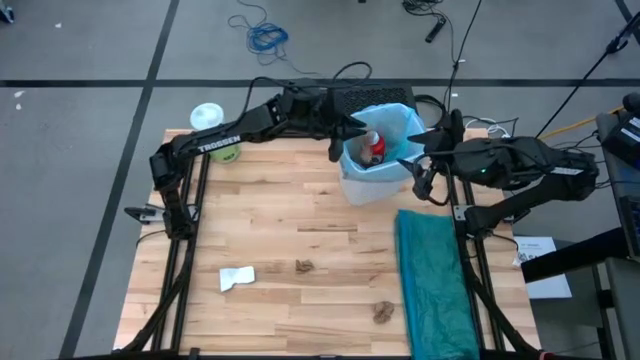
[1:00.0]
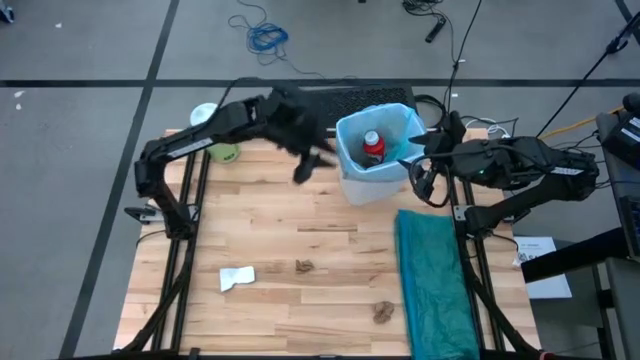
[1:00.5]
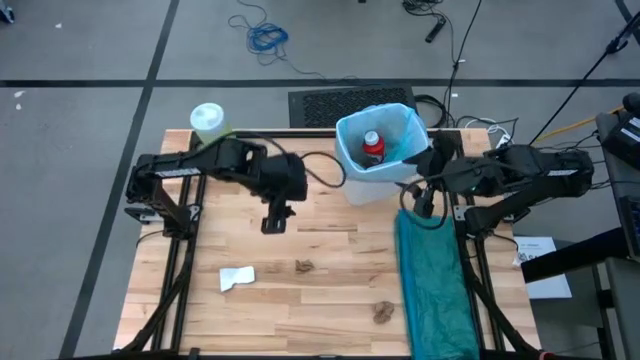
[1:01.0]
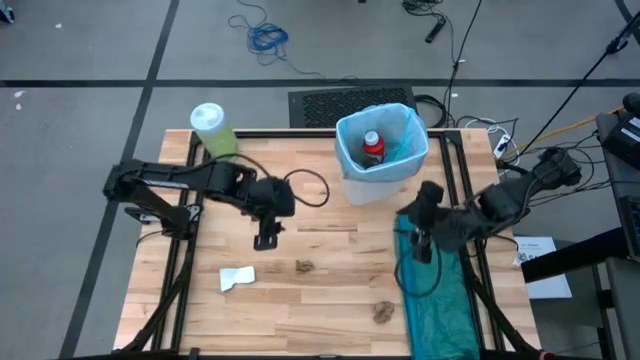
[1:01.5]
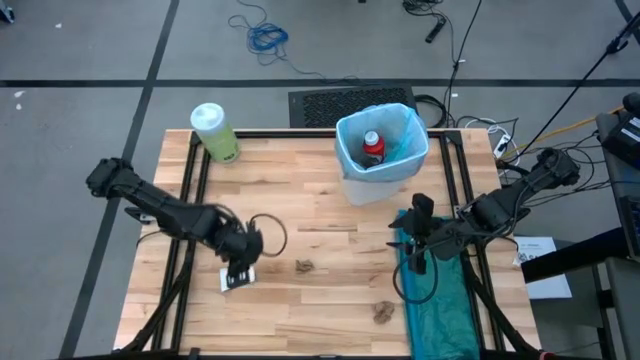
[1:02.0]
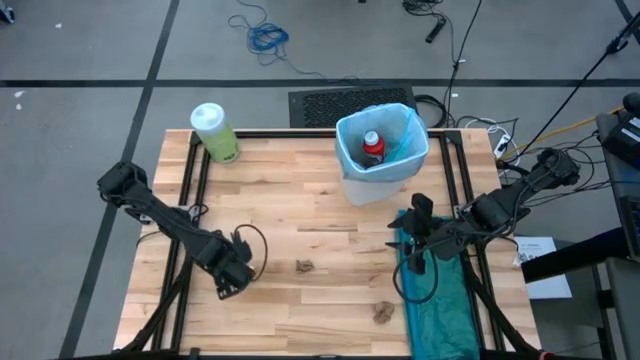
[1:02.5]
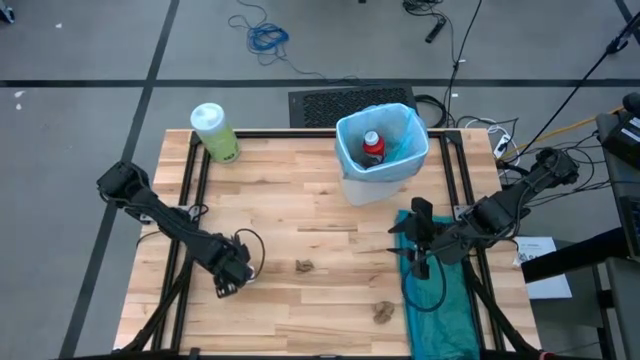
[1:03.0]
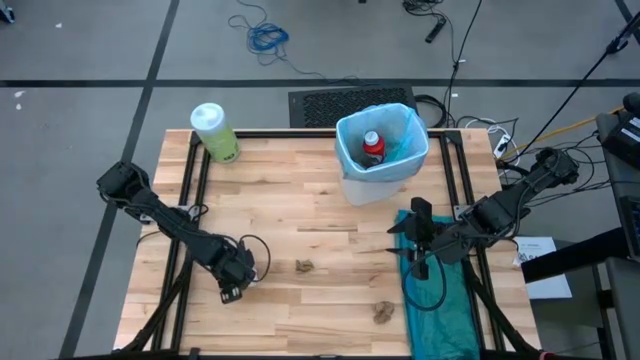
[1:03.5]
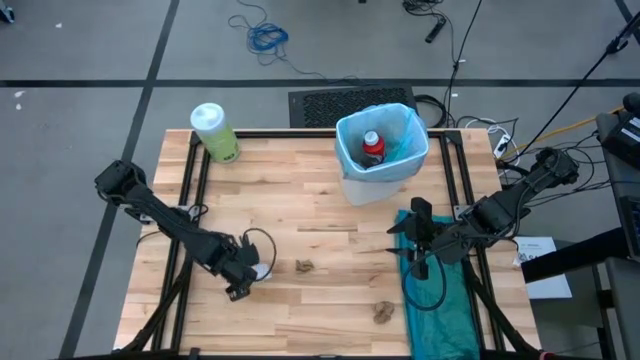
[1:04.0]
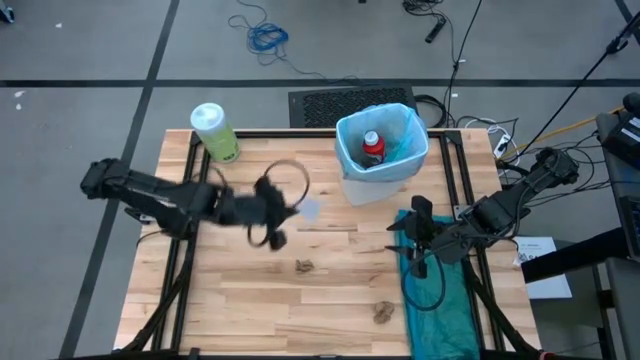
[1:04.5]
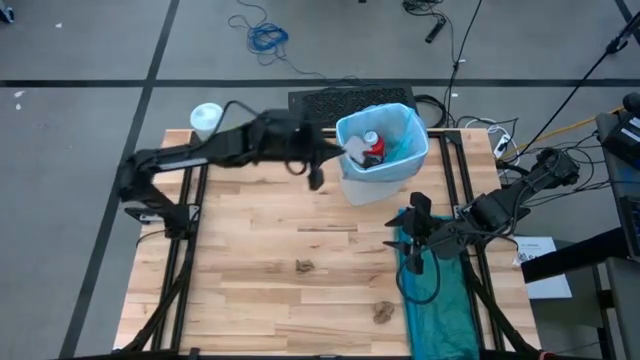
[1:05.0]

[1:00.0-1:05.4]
Task: place trash/remove bag and relplace
Put the white paper trash into the trash bin

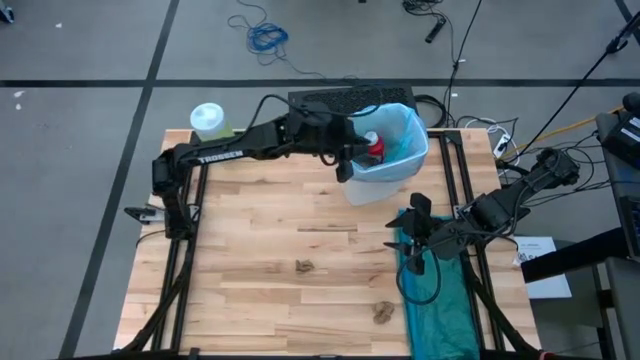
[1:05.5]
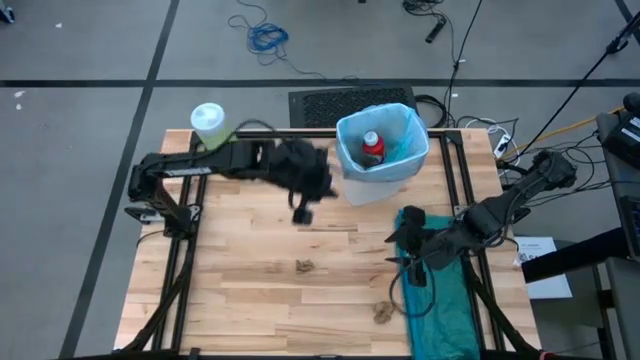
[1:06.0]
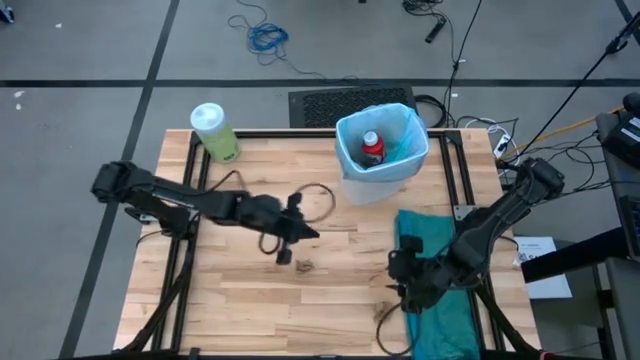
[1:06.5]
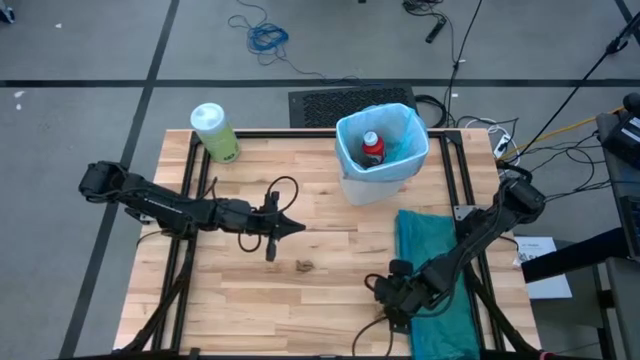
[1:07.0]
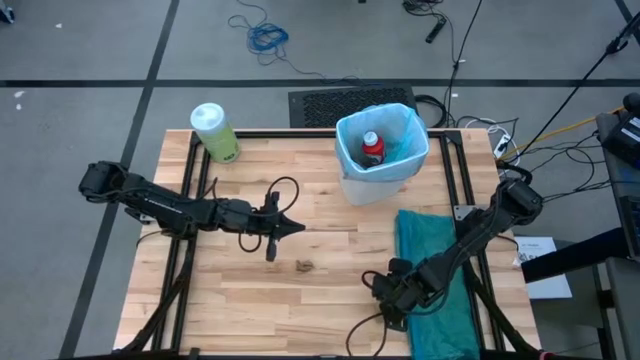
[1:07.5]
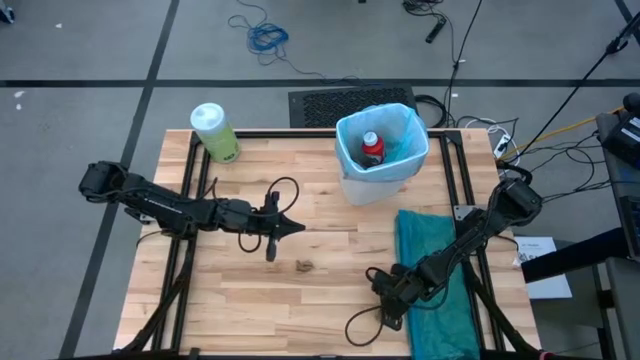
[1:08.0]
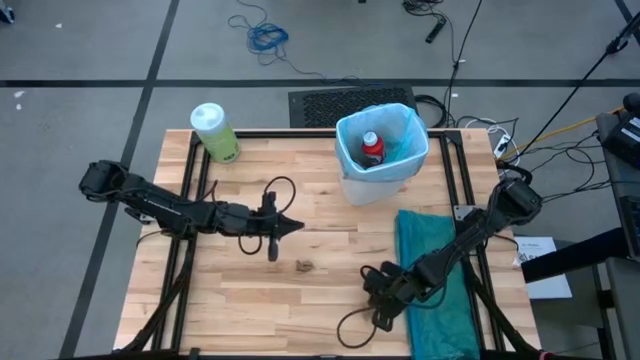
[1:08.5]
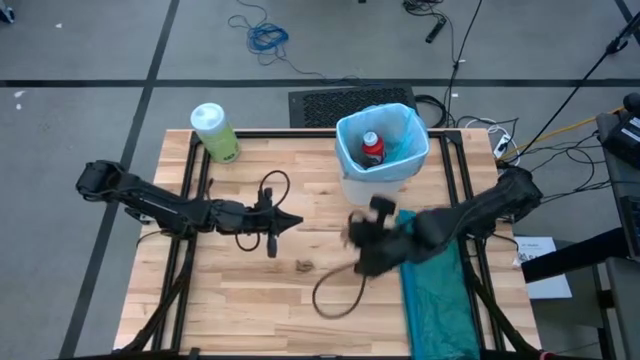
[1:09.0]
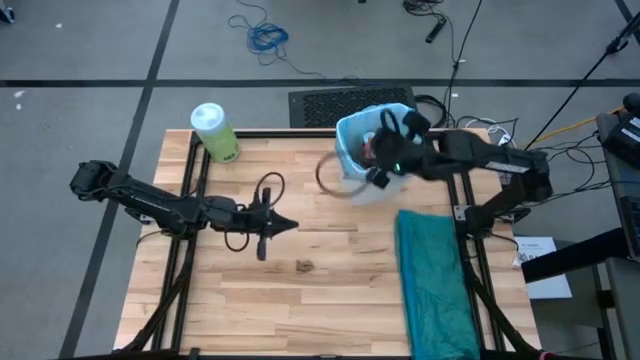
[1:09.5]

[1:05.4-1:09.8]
Put the brown paper trash into the trash bin

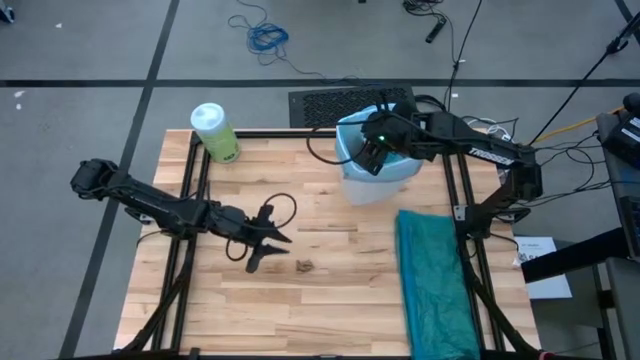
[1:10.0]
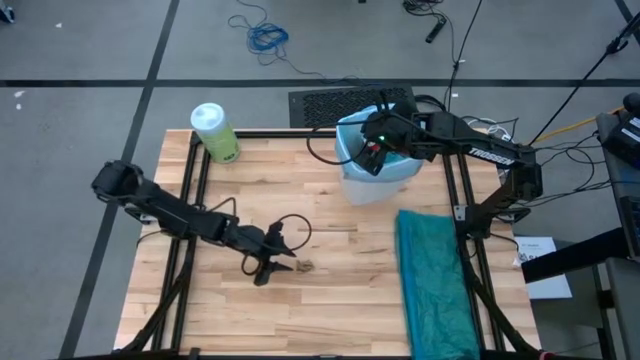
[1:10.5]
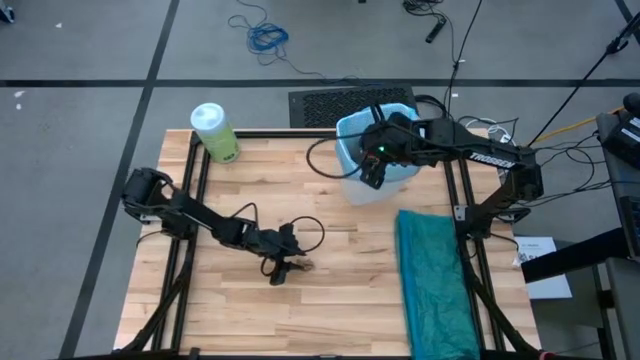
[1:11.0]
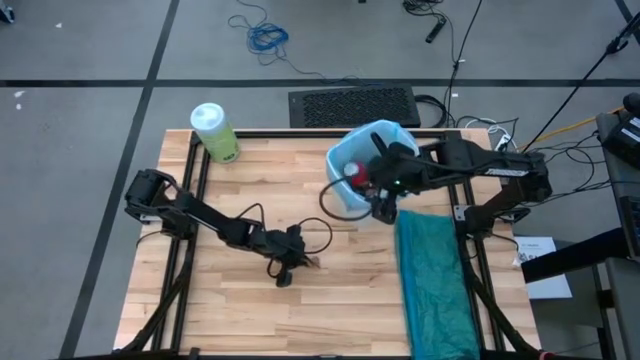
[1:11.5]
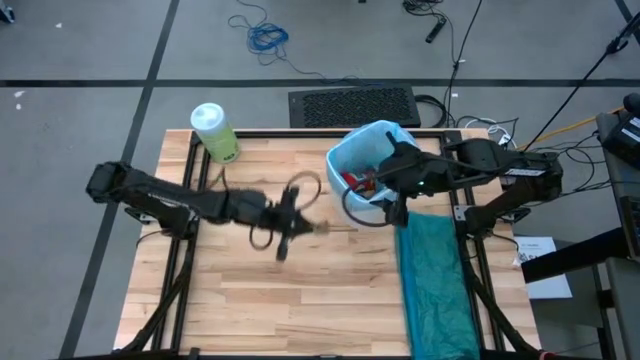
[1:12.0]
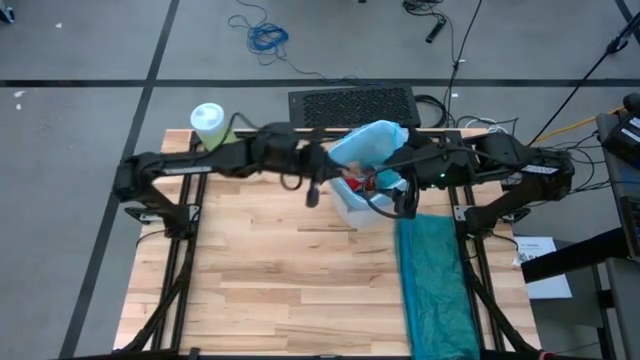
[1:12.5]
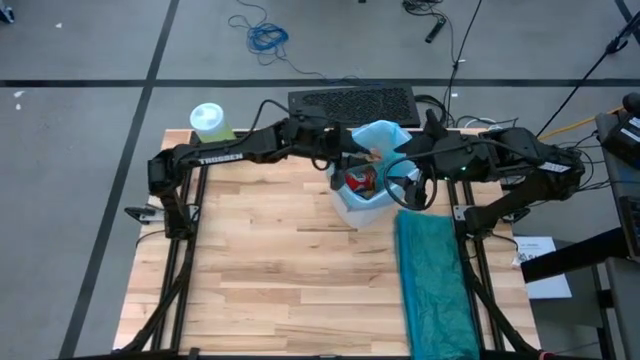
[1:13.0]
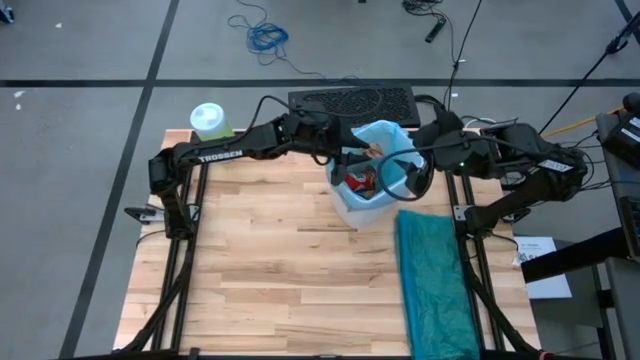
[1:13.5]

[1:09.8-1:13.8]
Put the brown paper trash into the trash bin

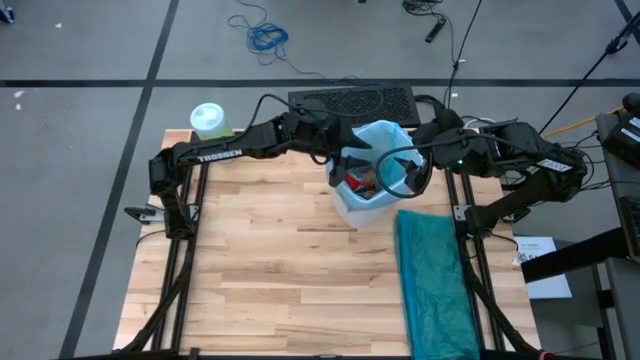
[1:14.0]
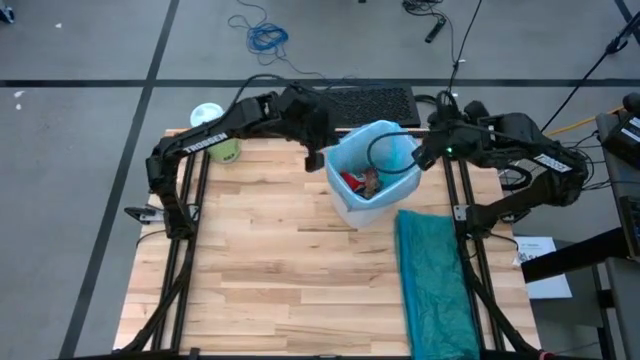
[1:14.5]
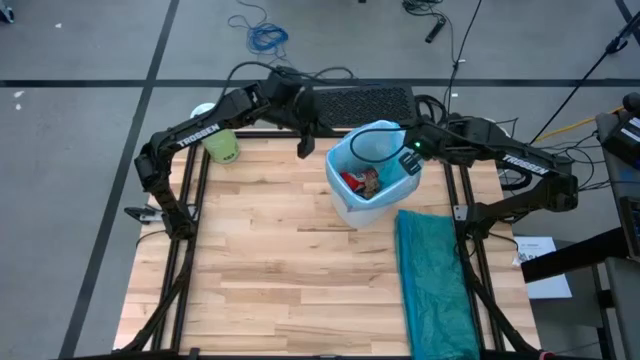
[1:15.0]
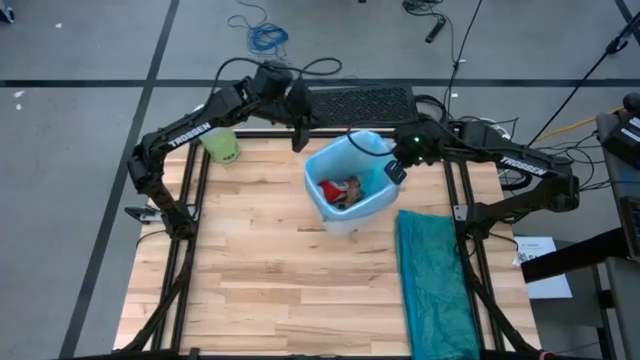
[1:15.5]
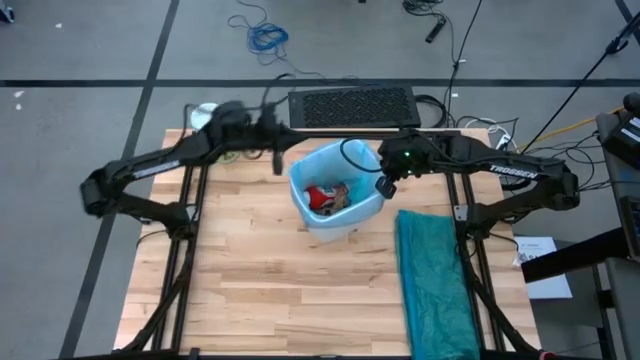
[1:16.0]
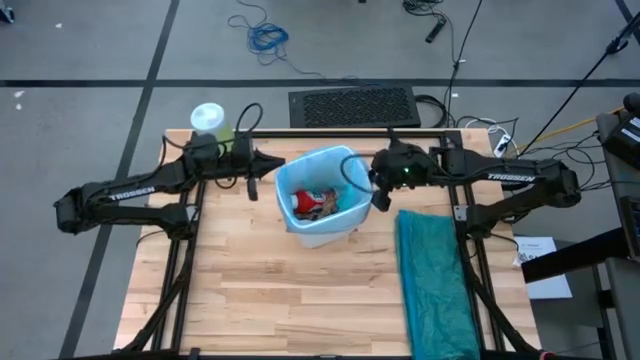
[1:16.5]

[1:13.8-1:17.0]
Move the white trash bin from the right to the center

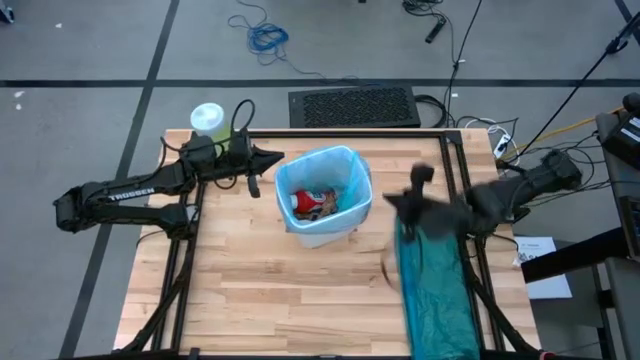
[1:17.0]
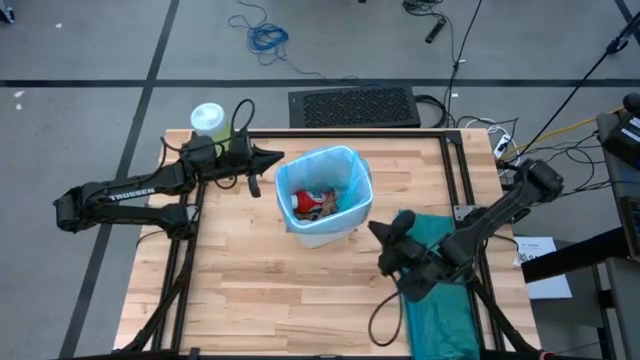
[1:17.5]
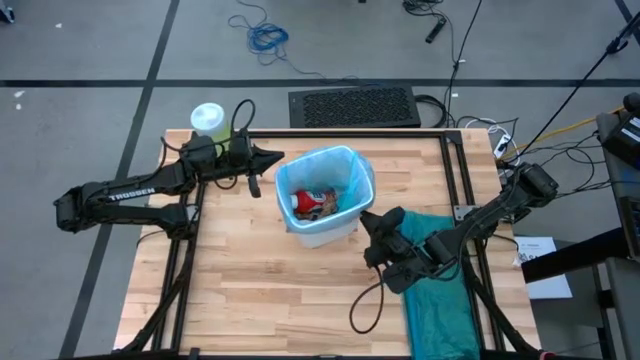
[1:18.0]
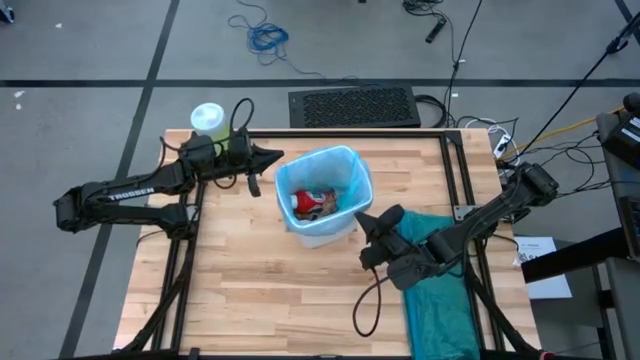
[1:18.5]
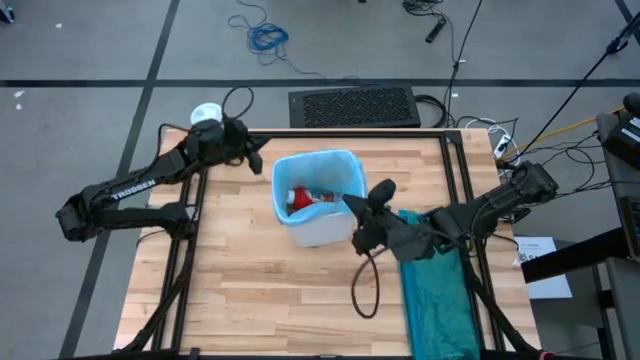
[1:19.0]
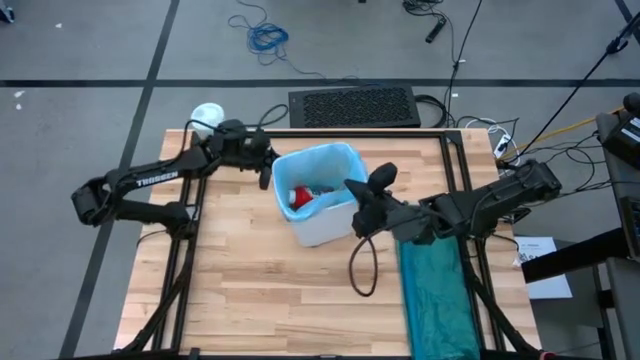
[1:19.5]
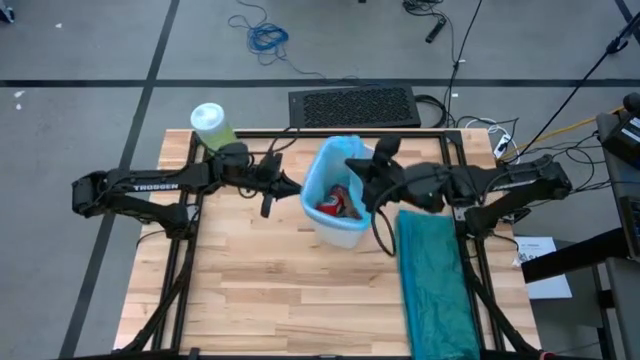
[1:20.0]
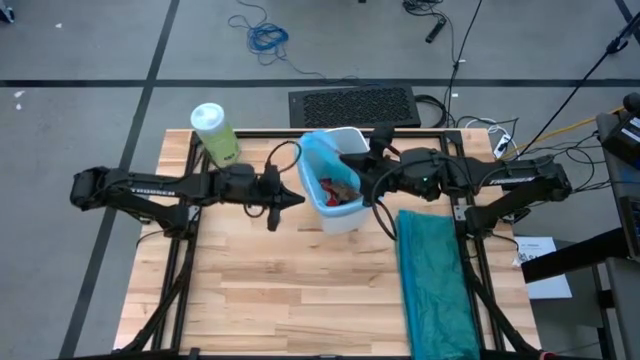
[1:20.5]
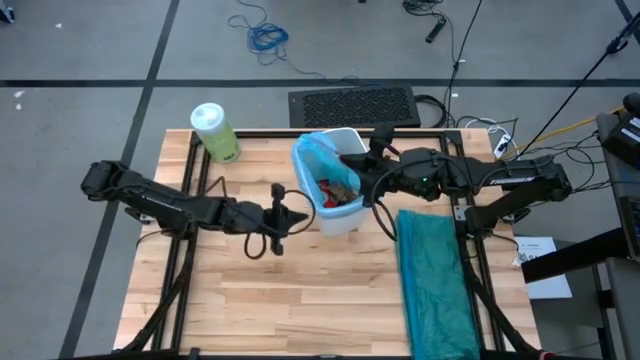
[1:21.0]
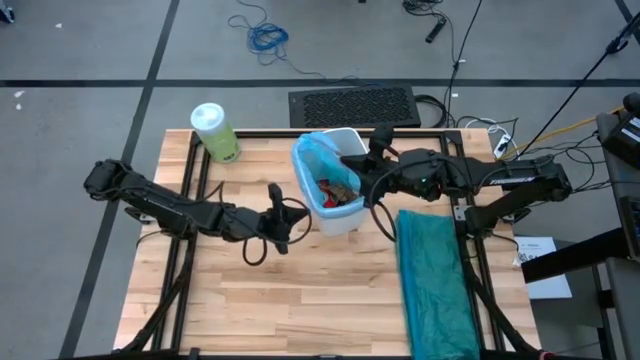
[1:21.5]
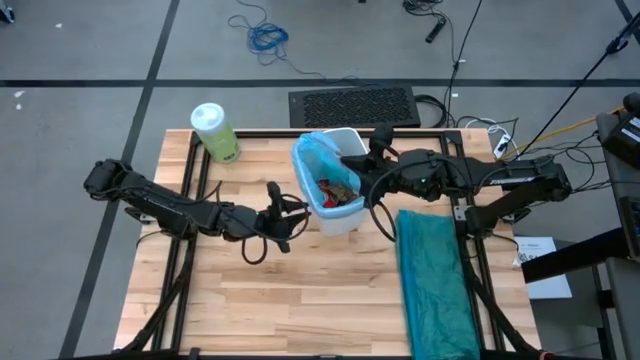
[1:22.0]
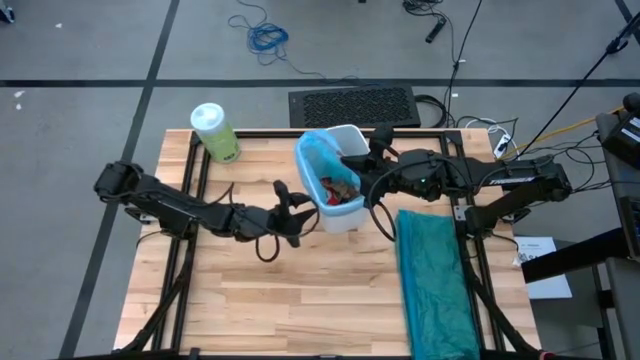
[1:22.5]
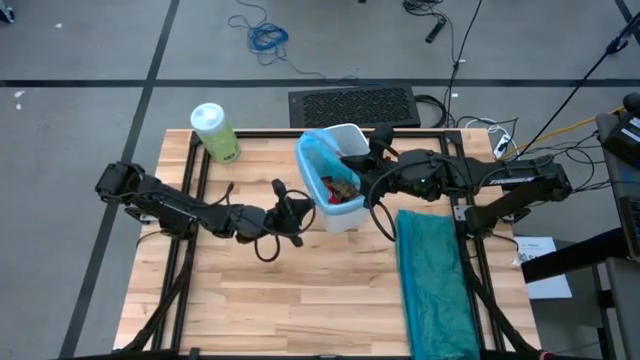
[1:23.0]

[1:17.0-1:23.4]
Close the blue plastic bag
